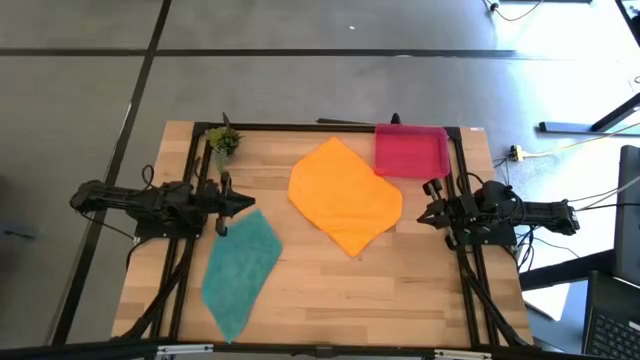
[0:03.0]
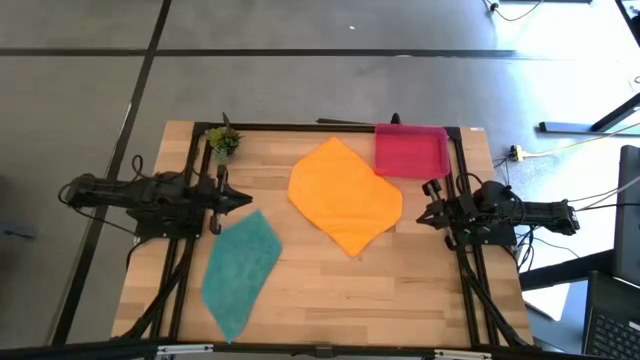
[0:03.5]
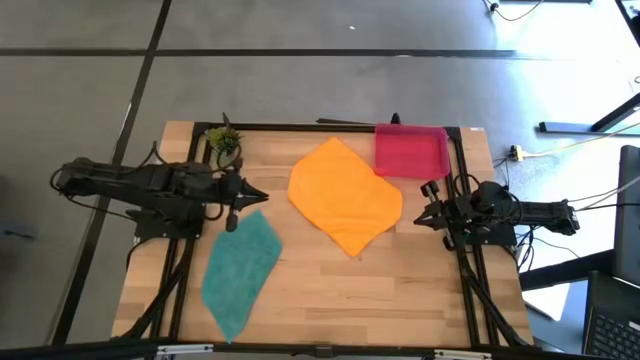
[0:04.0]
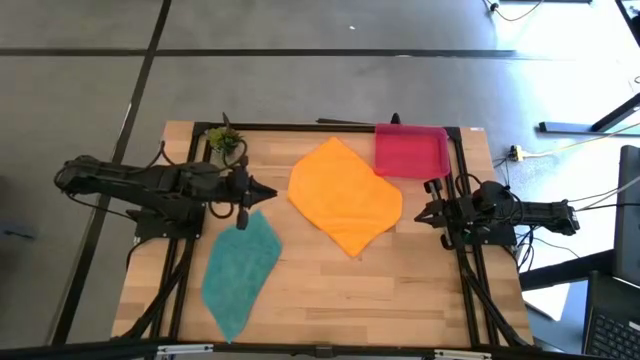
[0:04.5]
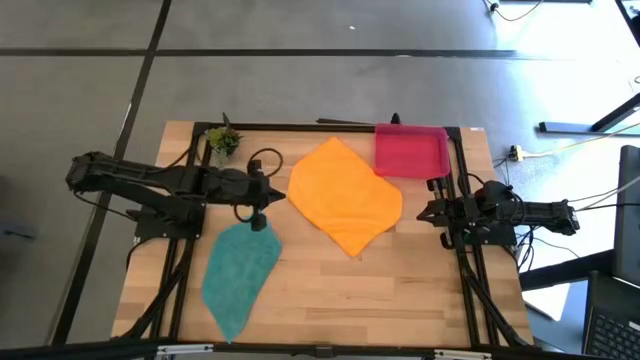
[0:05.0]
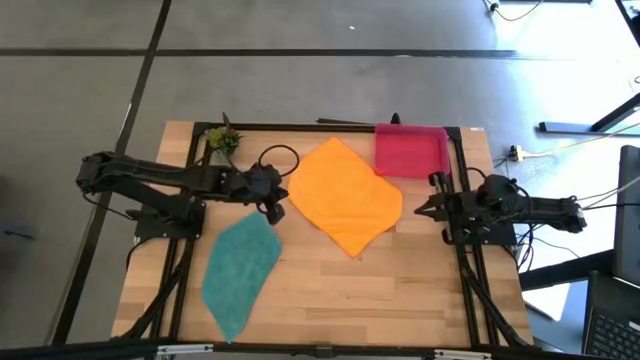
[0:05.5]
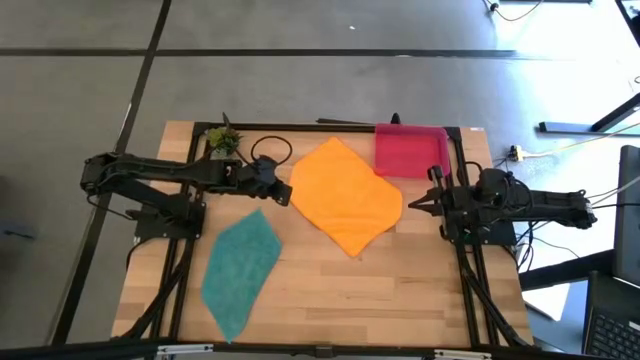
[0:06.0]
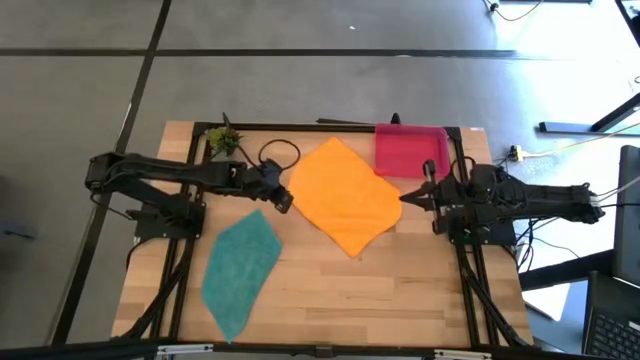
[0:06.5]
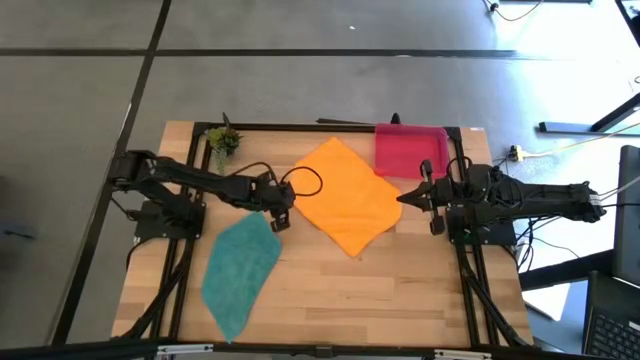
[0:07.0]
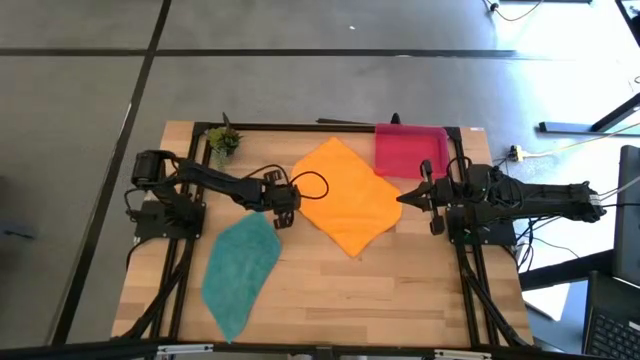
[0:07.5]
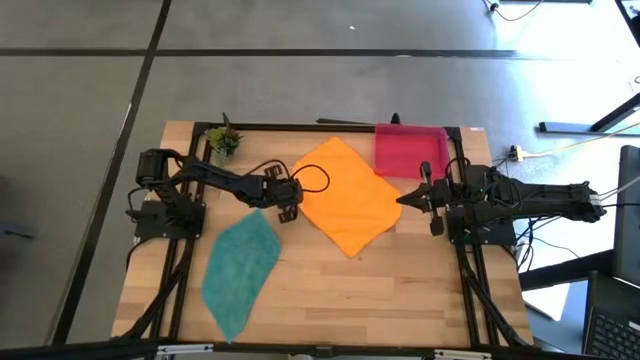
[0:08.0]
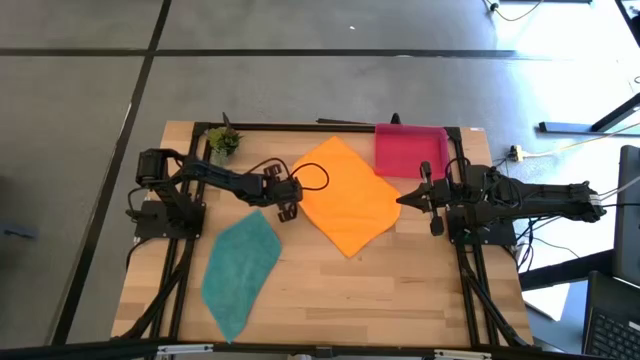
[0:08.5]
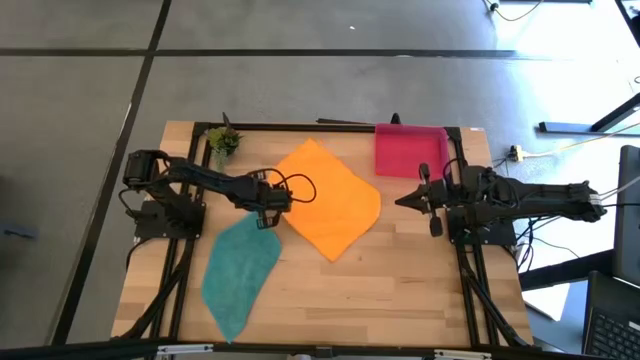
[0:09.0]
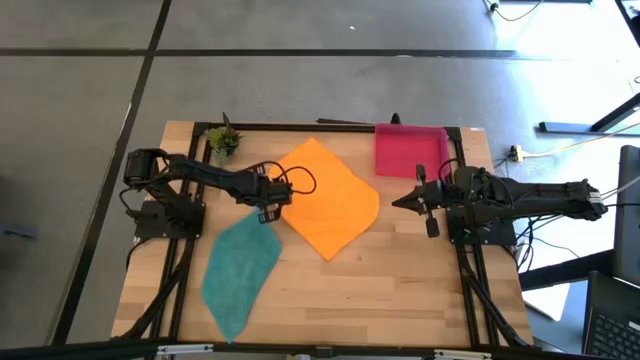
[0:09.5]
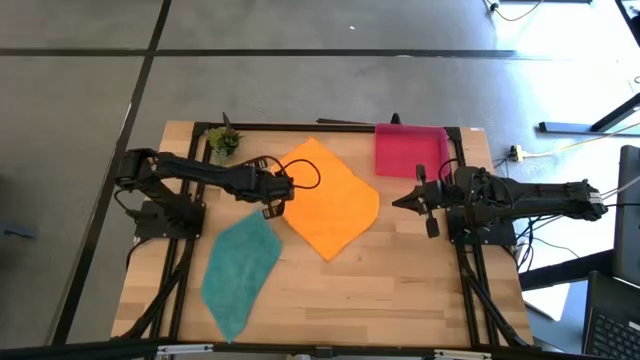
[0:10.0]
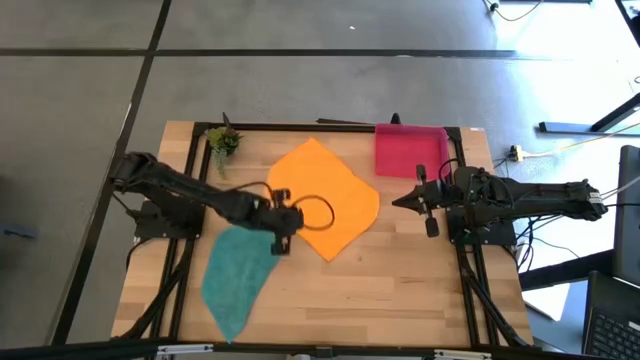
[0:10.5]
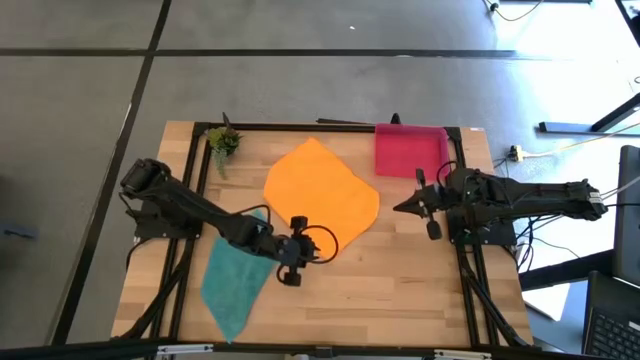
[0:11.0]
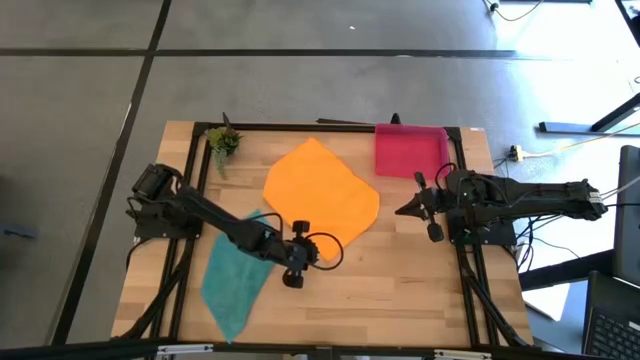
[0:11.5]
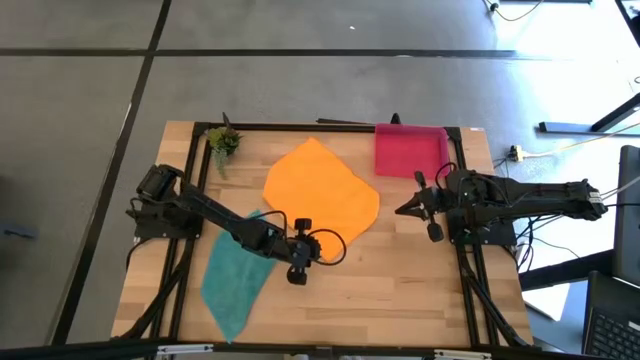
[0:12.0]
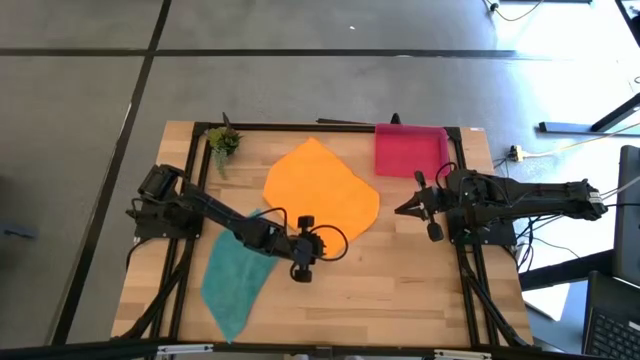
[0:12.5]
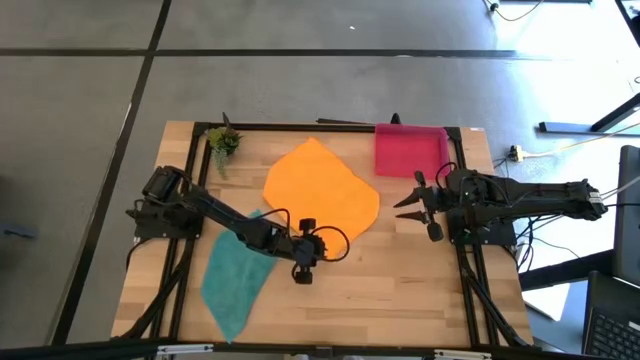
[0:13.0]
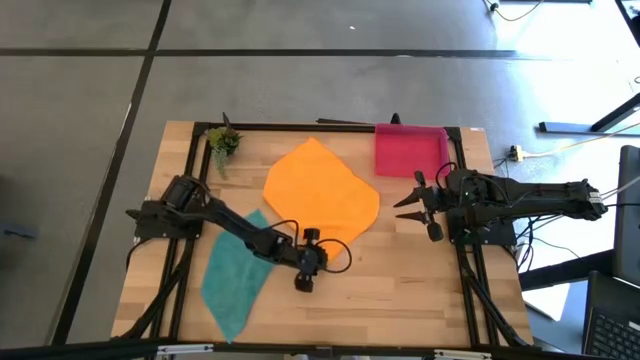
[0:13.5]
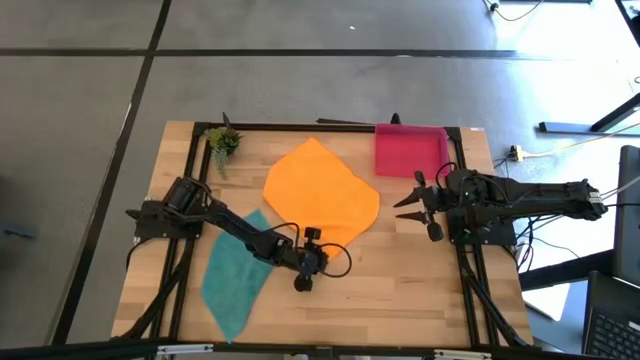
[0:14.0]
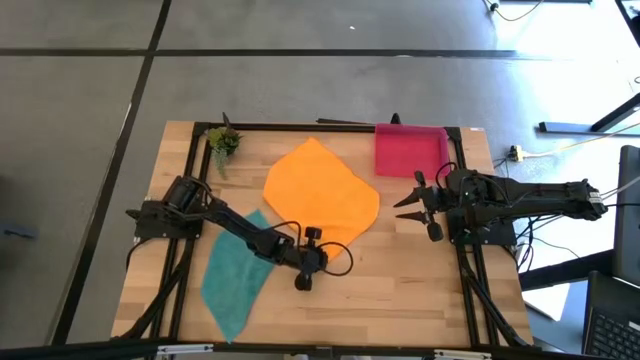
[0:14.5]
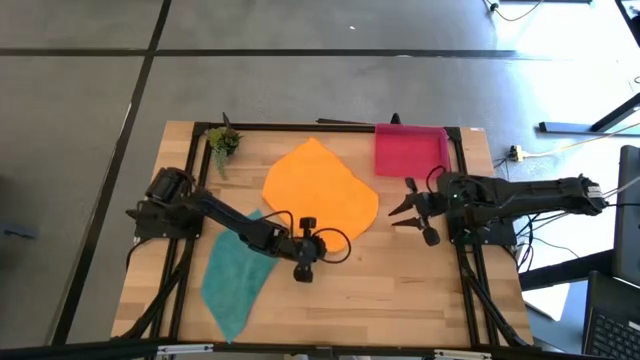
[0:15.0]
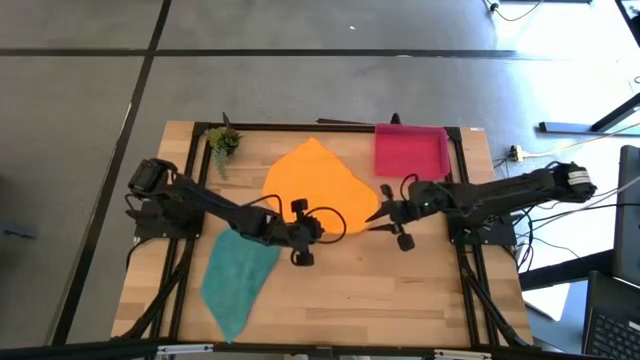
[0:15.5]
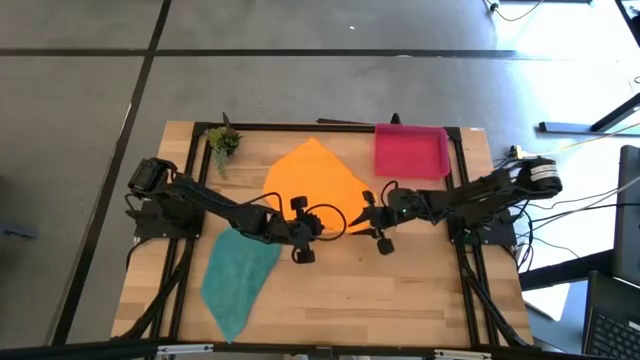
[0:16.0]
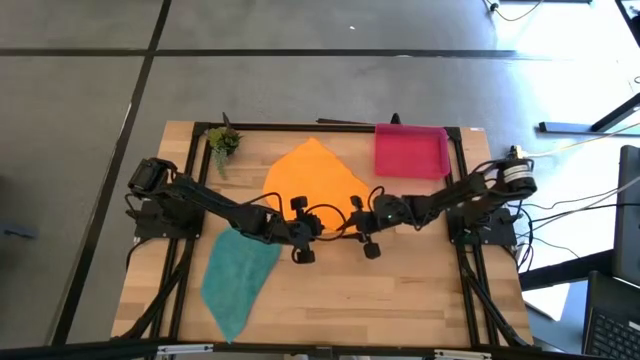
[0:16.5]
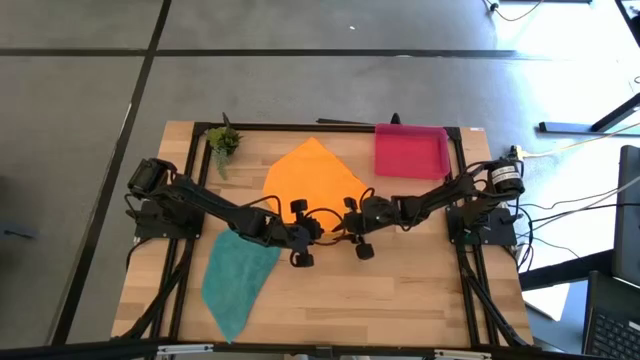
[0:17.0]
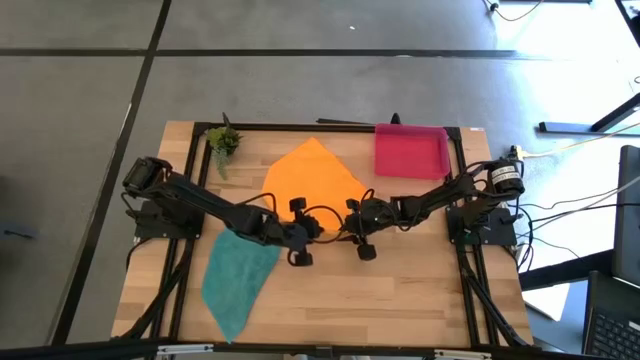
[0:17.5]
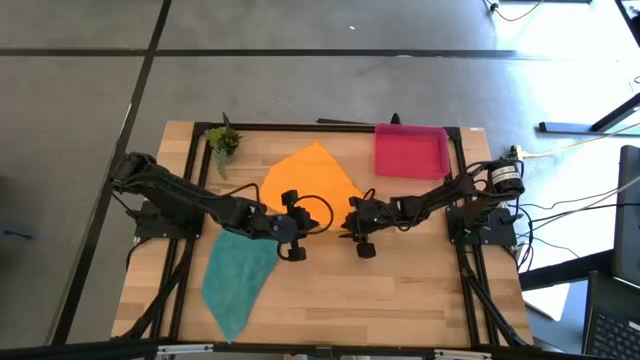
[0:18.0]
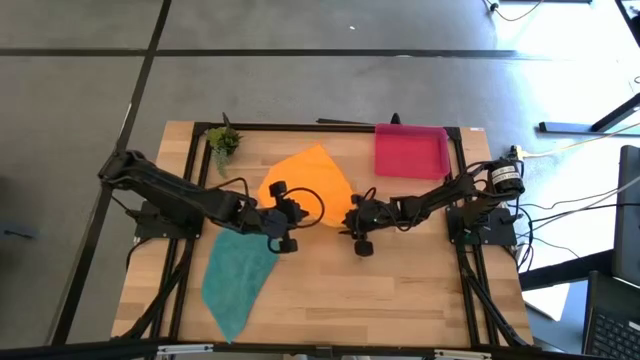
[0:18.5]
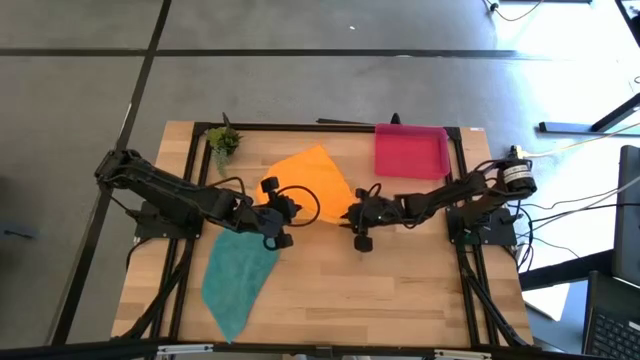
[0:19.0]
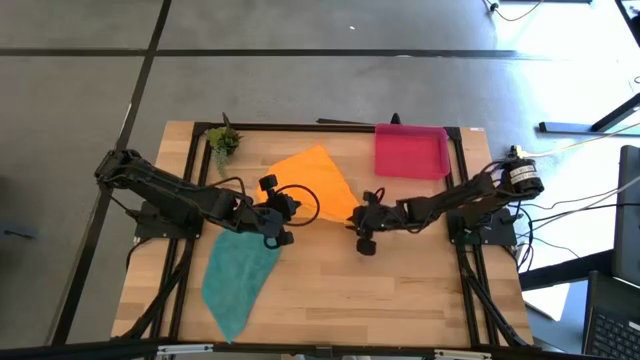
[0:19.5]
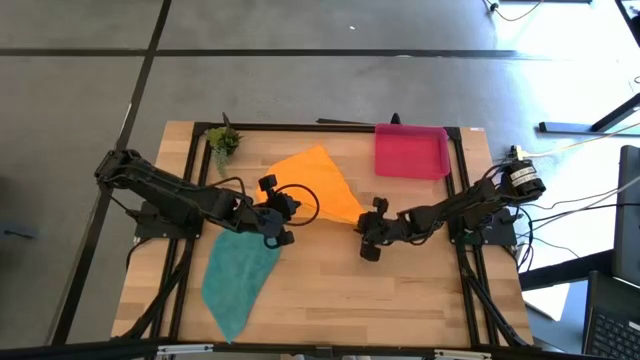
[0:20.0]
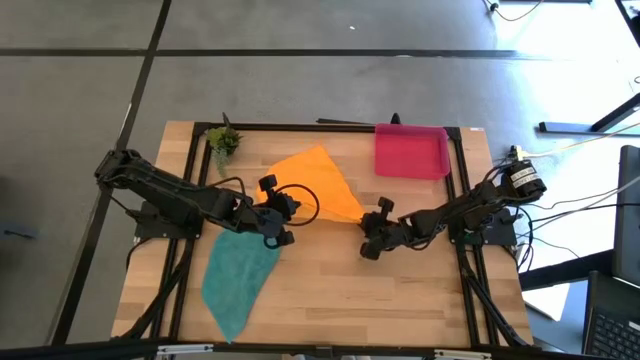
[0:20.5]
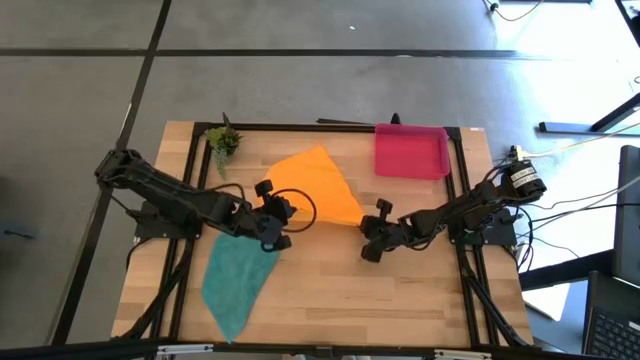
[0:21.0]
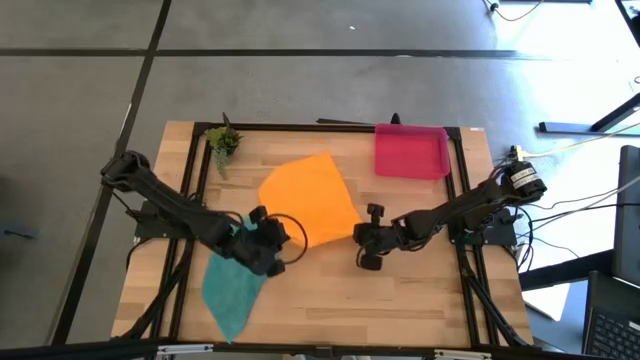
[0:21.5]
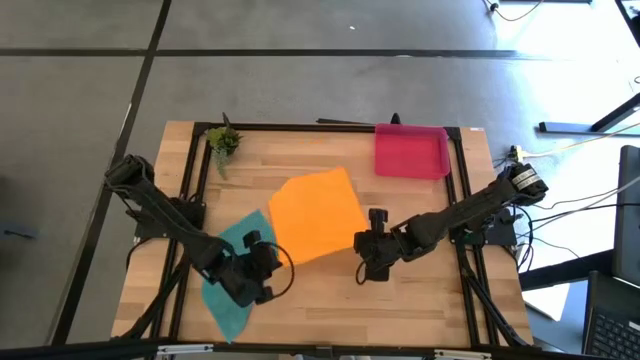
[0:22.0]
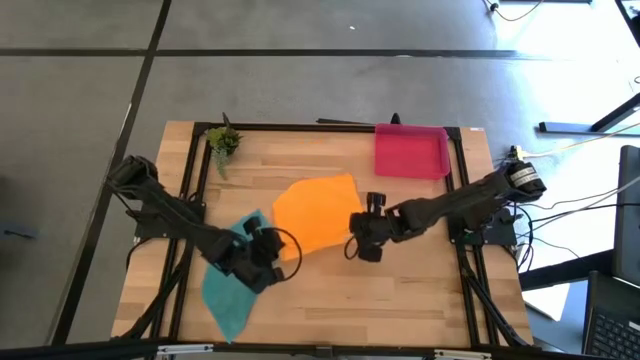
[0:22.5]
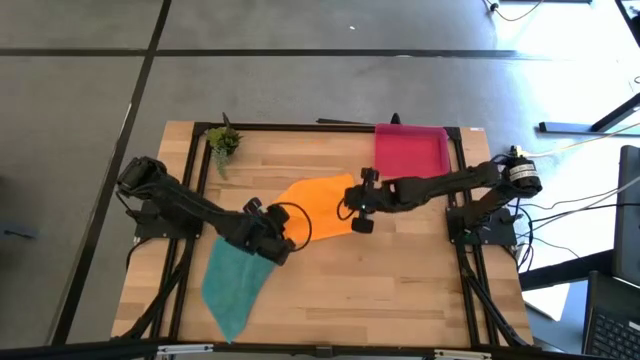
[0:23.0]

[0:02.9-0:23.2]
Task: Roll microfiber towels into tight, uniform cylinder then place into a basket
Fold the orange microfiber towel
